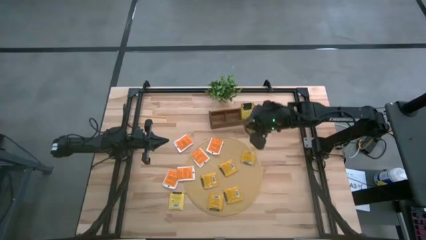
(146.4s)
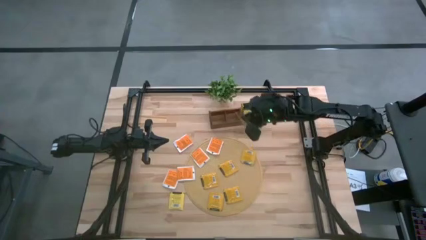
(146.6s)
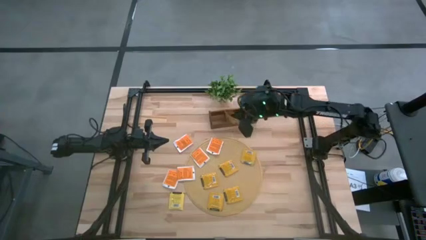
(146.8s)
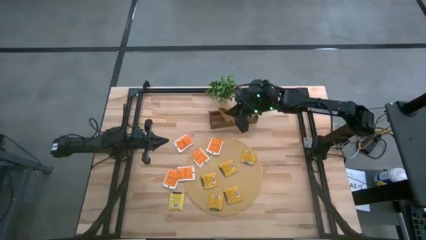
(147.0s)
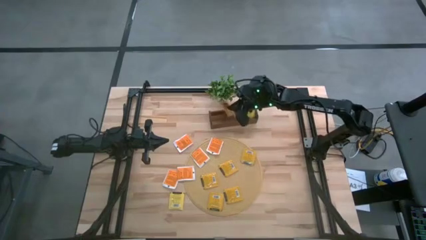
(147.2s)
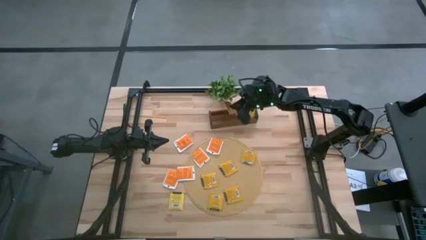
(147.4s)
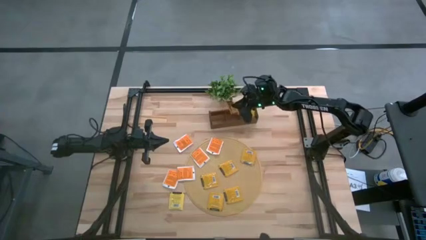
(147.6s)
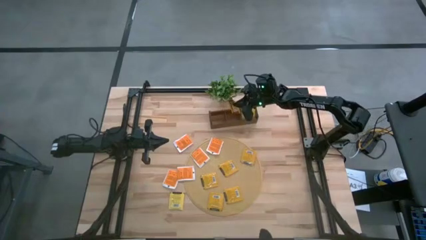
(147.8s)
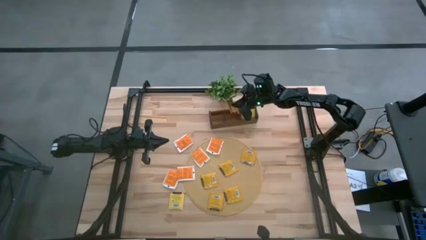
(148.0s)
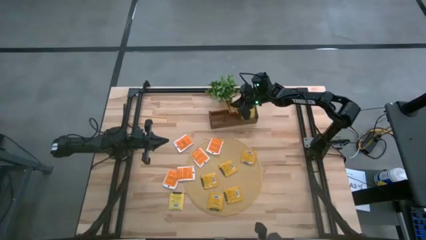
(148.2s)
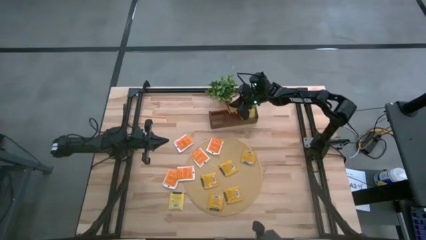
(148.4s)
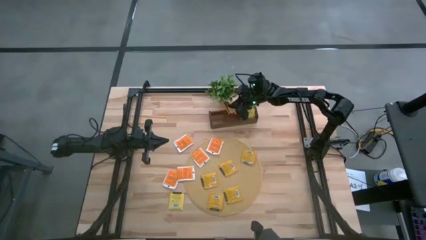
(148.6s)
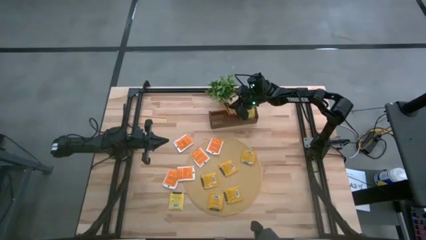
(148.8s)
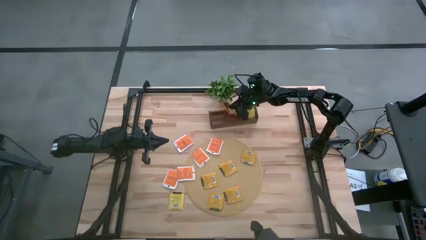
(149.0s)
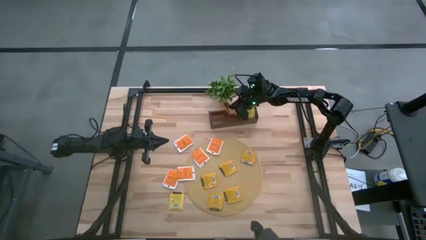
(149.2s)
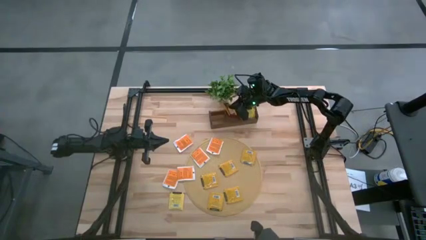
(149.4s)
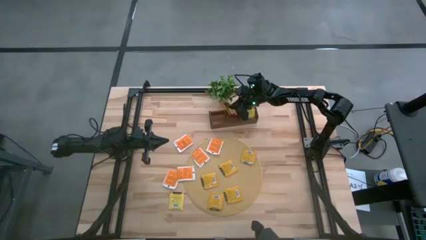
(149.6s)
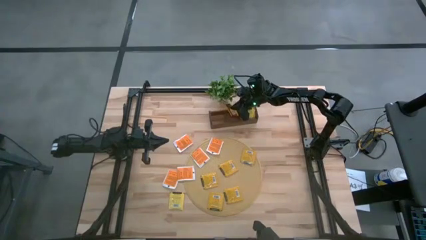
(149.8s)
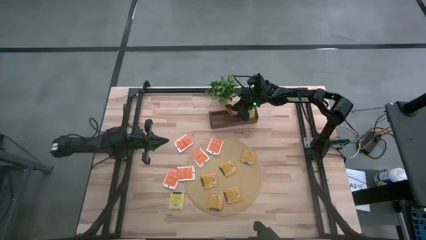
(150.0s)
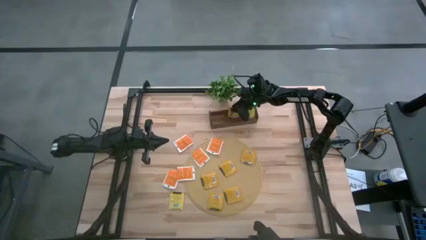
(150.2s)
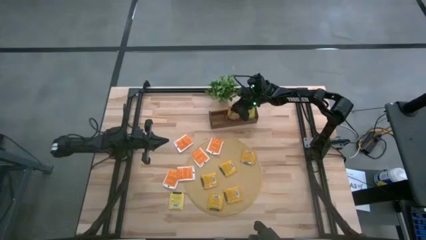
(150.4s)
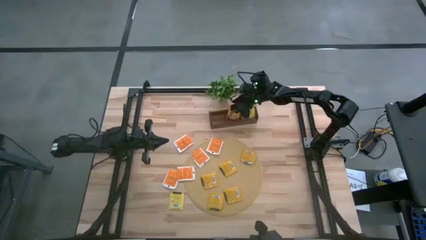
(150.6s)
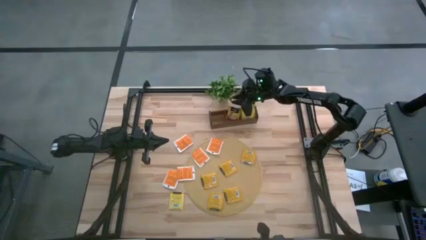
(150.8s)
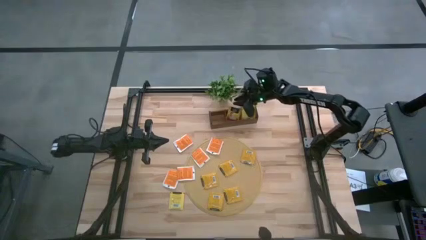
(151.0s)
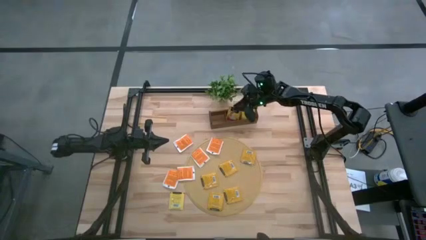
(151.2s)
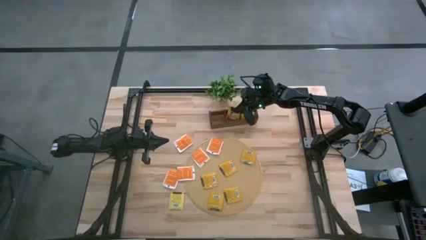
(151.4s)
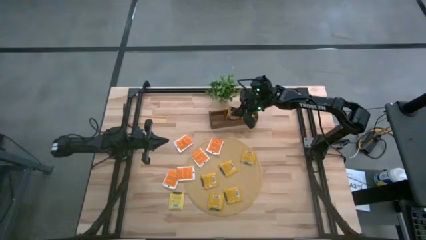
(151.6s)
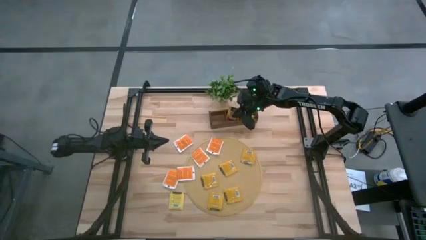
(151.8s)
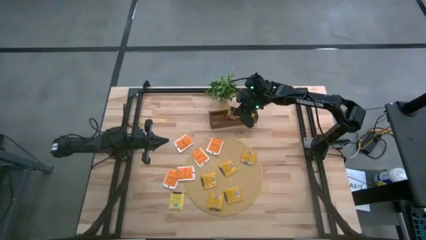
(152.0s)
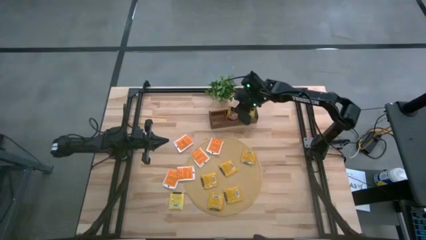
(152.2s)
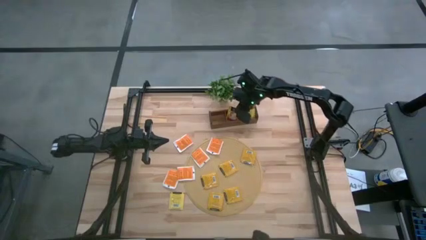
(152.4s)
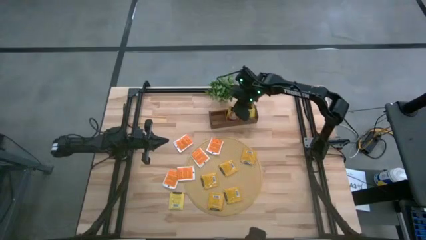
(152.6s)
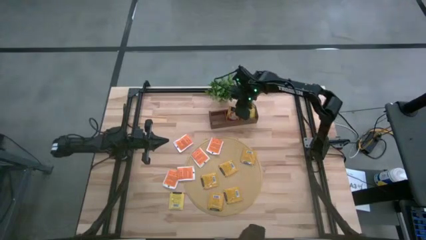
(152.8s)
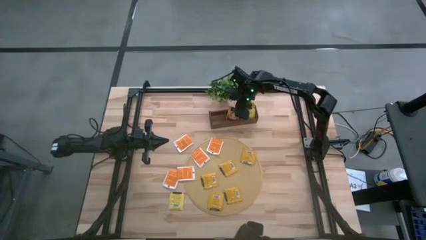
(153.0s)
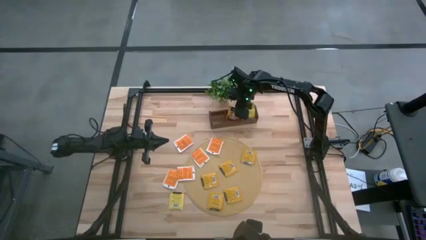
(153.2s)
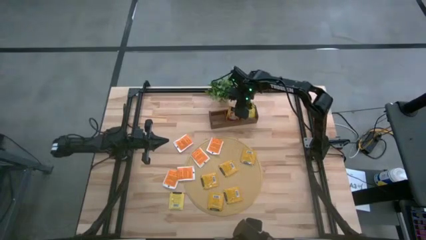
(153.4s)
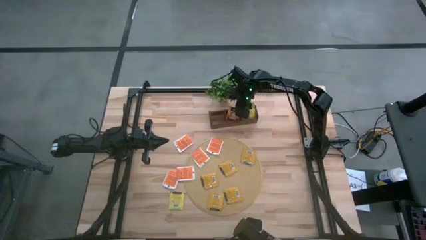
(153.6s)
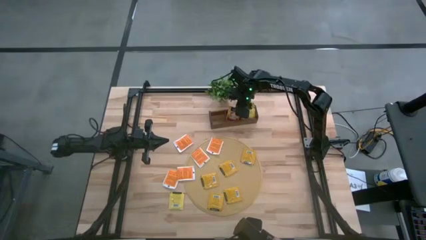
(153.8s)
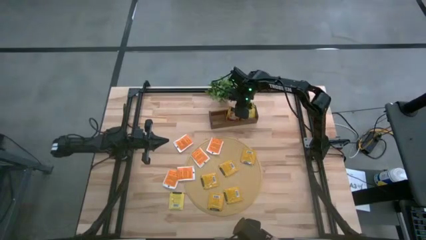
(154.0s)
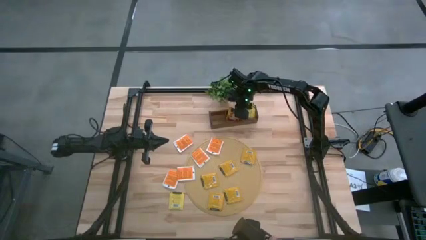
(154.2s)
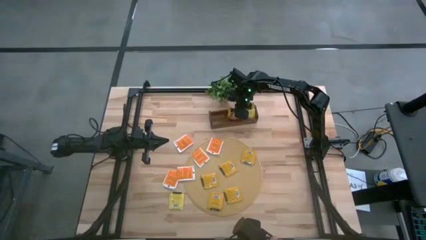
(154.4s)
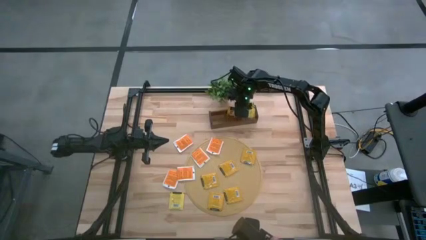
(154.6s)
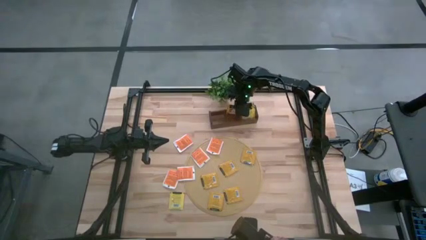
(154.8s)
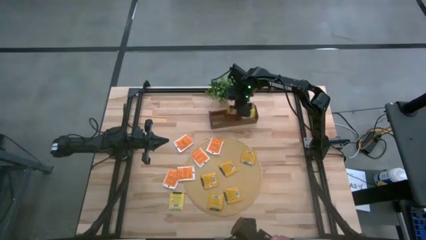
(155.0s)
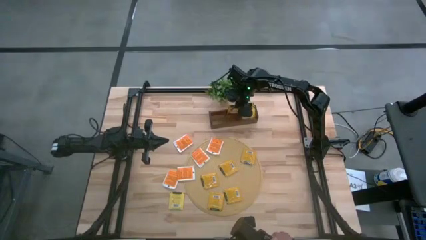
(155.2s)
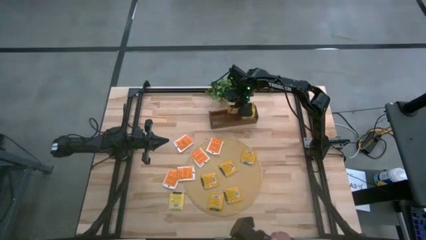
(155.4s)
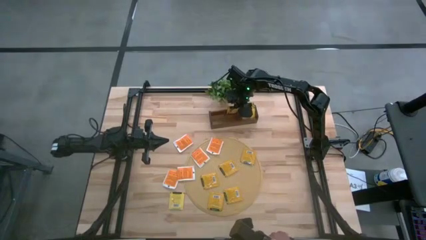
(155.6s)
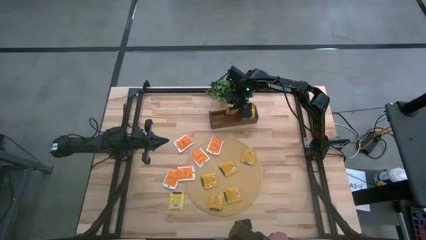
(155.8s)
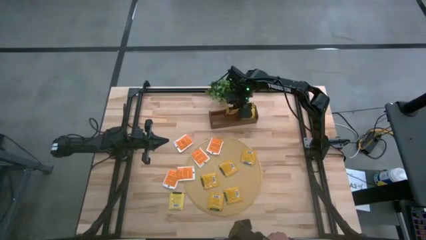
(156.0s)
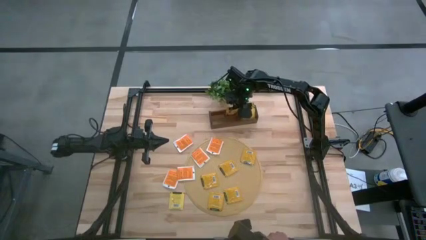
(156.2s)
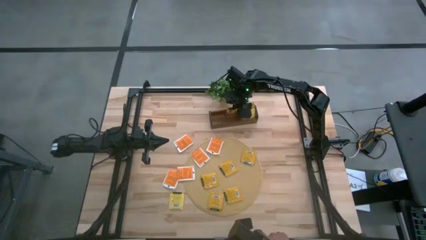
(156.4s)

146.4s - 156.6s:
Task: Pick & Place Tea
Put the orange tea bag into the middle section of the wooden organizer

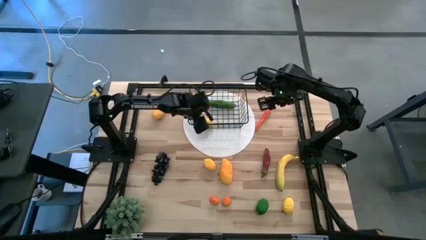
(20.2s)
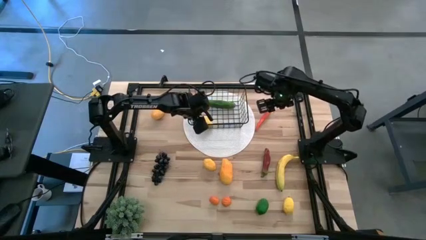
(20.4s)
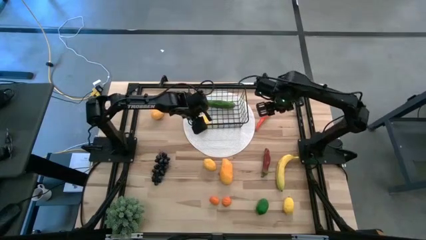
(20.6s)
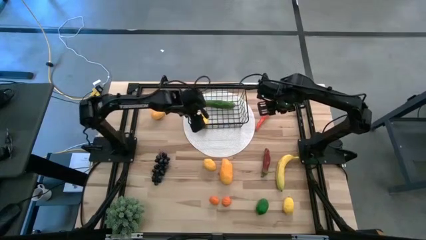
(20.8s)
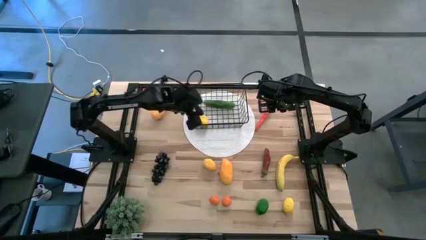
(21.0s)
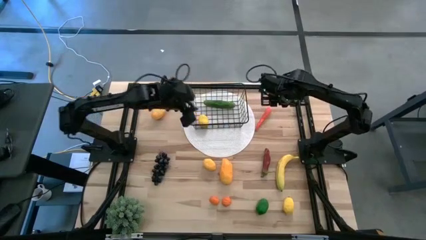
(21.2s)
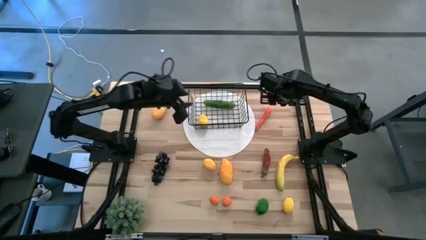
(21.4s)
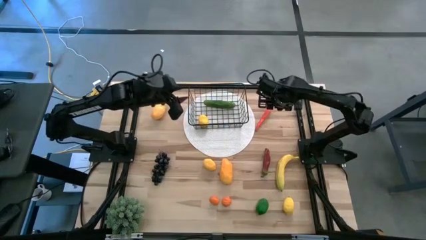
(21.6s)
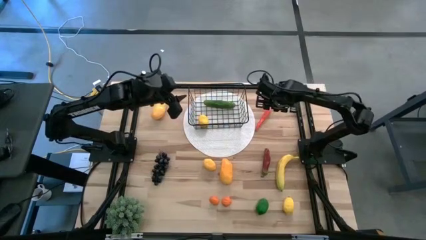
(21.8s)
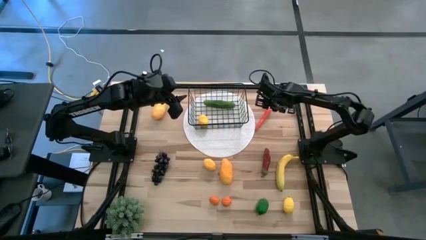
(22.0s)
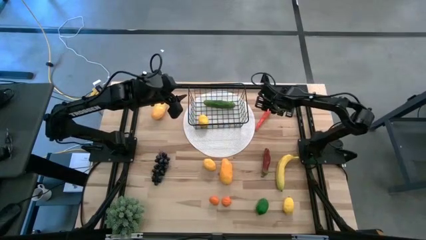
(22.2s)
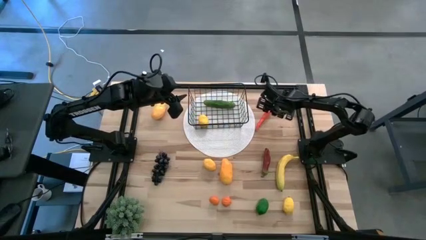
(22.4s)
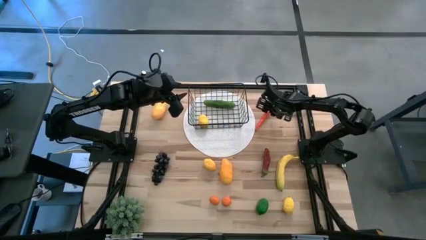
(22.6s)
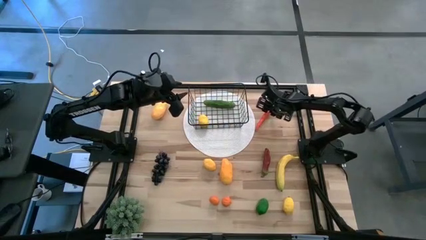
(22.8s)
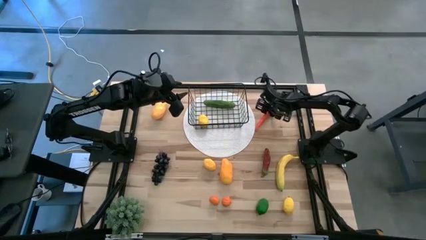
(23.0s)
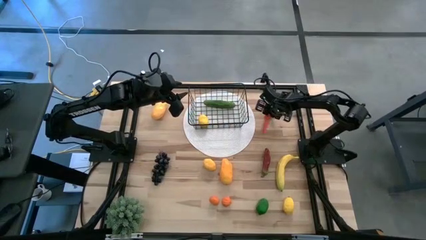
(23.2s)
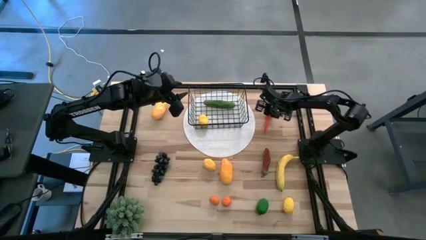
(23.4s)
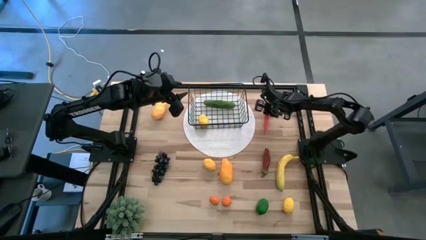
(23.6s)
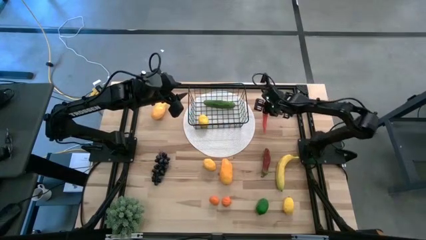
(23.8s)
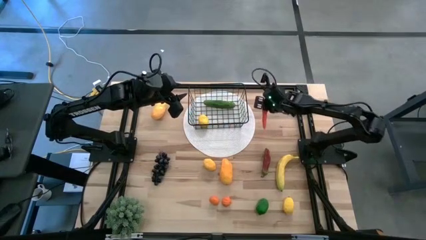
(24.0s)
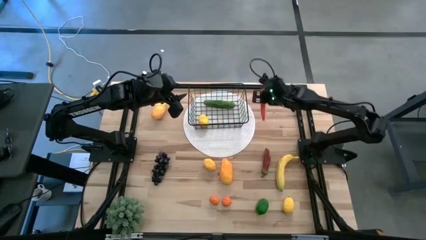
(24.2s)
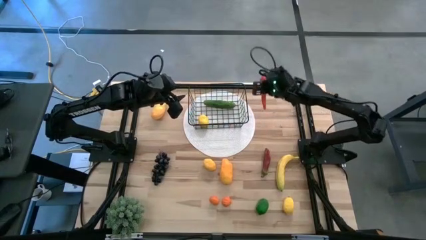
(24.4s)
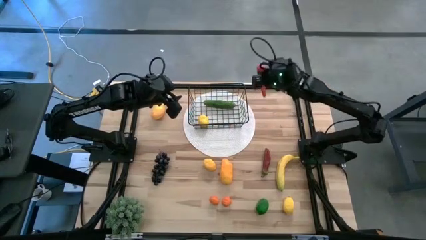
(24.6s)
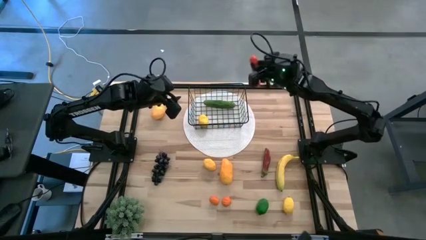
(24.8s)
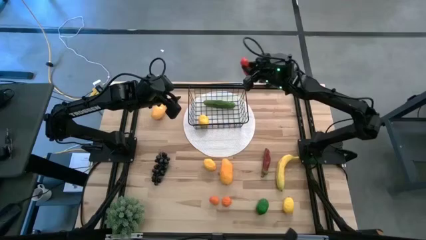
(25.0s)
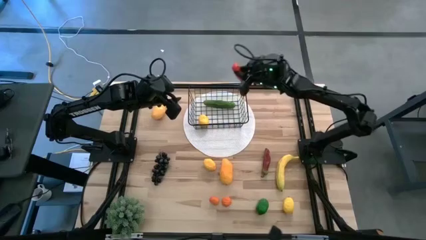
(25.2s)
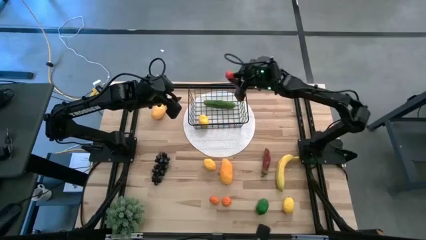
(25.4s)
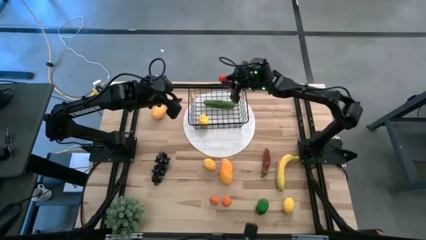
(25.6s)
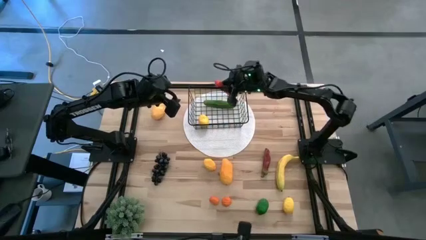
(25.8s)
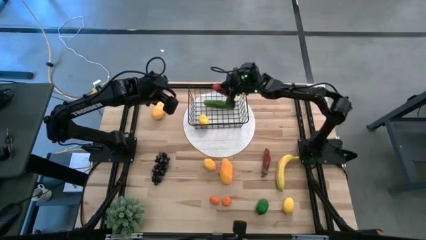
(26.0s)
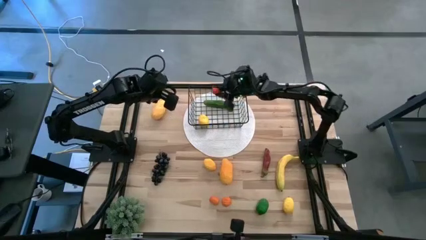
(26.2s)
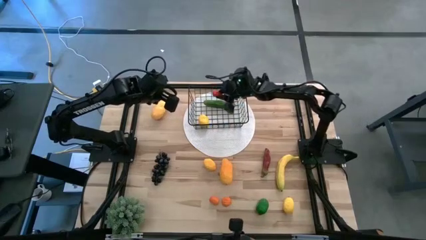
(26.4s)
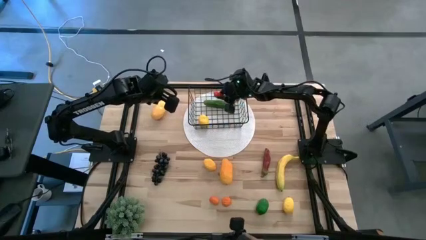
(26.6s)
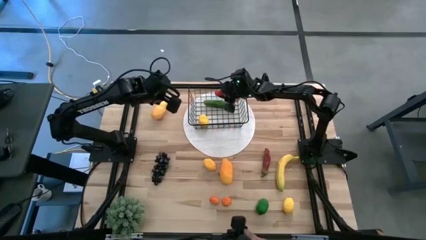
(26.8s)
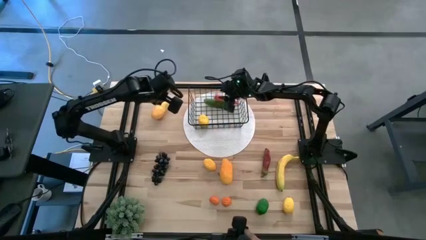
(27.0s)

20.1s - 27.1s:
Task: Build produce basket
Put the carrot into the black basket
